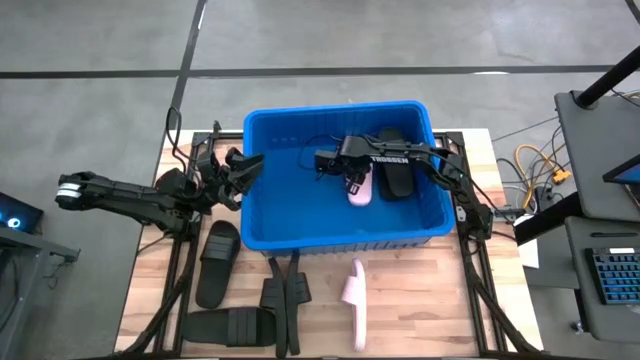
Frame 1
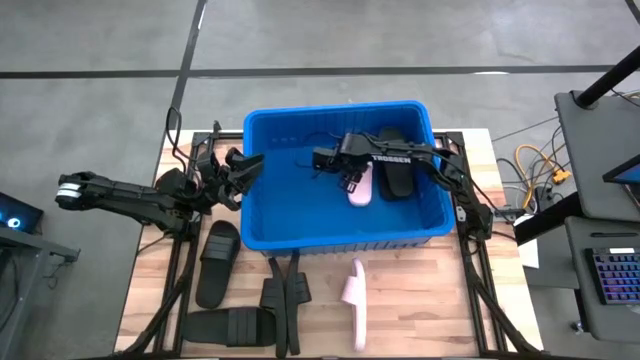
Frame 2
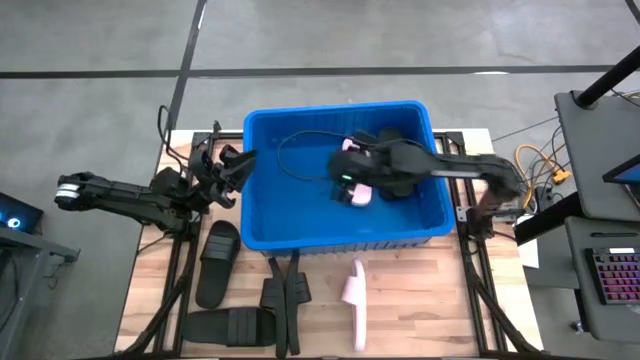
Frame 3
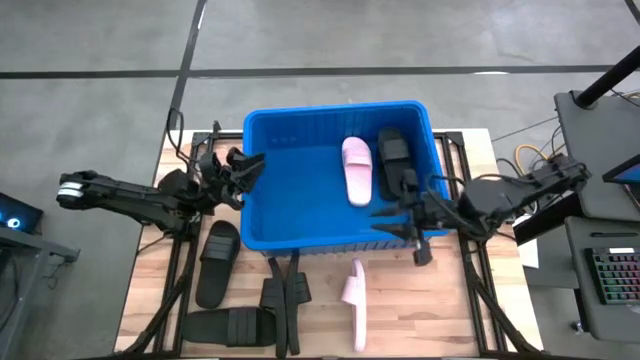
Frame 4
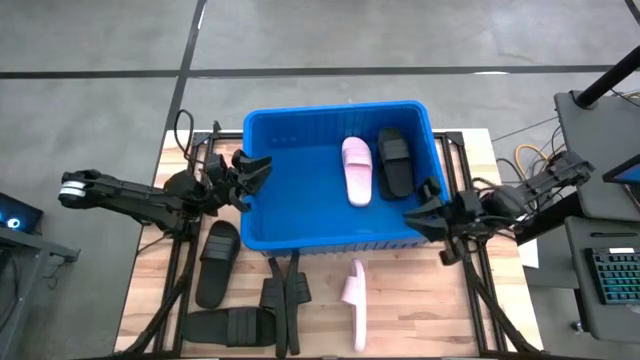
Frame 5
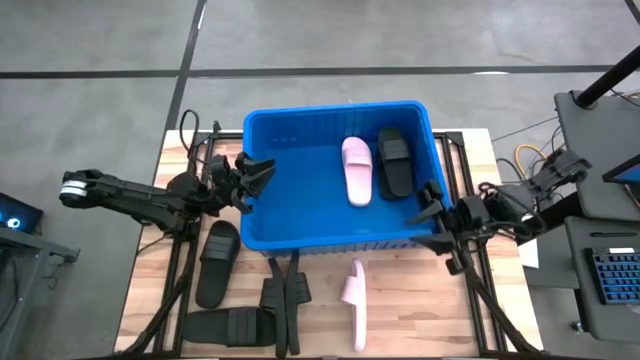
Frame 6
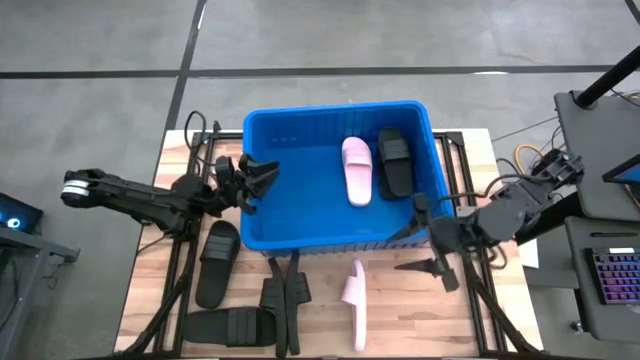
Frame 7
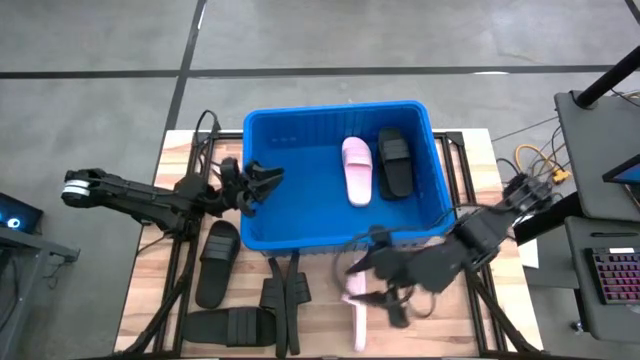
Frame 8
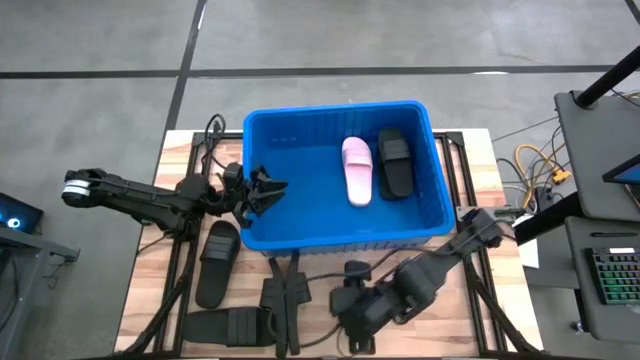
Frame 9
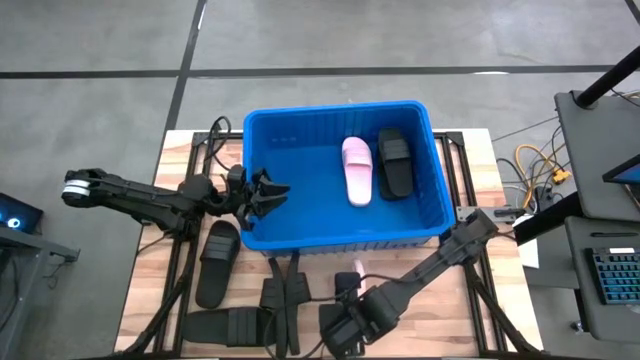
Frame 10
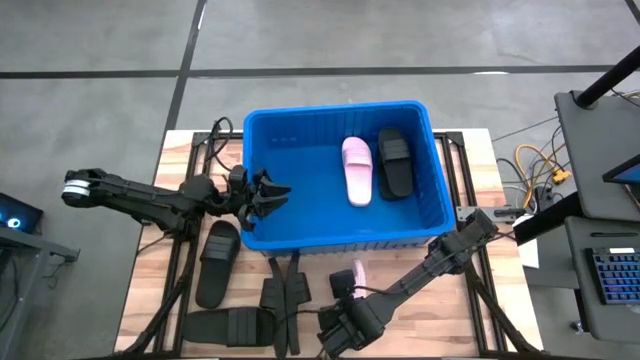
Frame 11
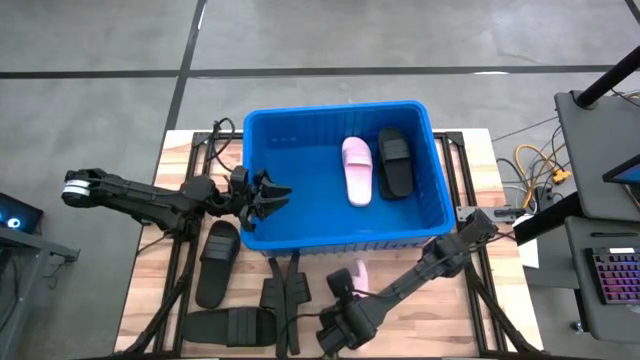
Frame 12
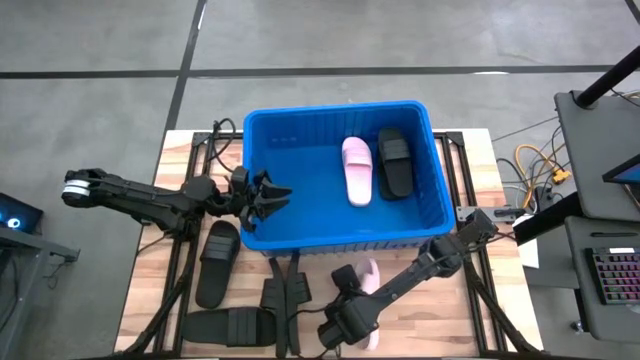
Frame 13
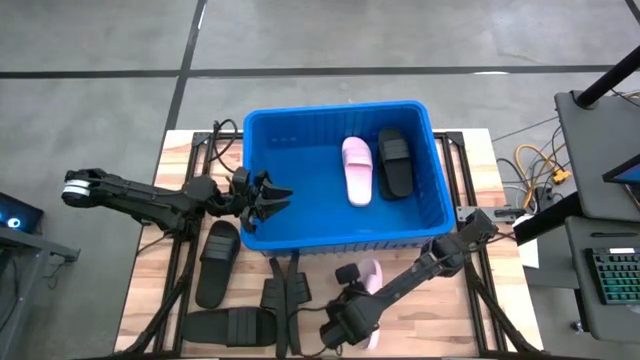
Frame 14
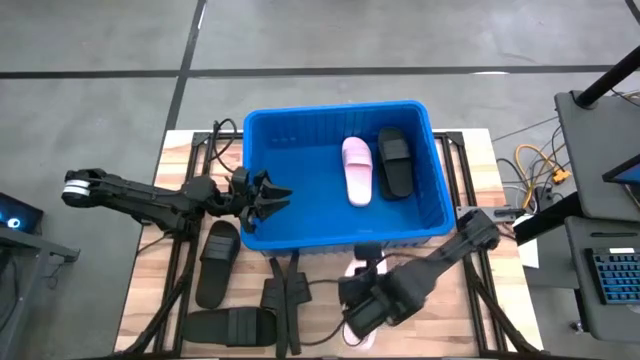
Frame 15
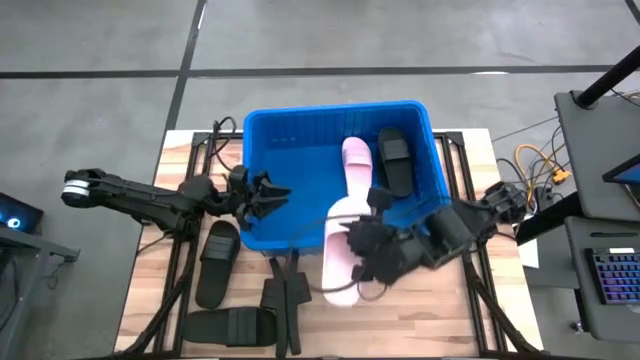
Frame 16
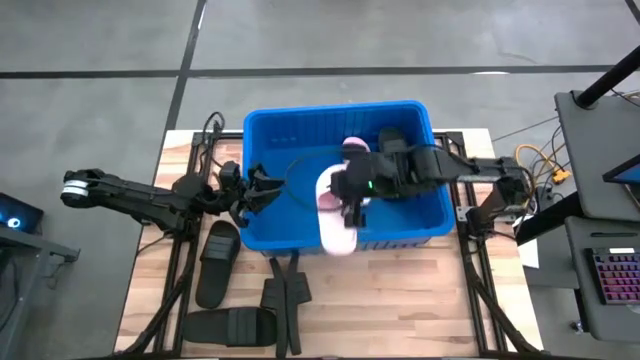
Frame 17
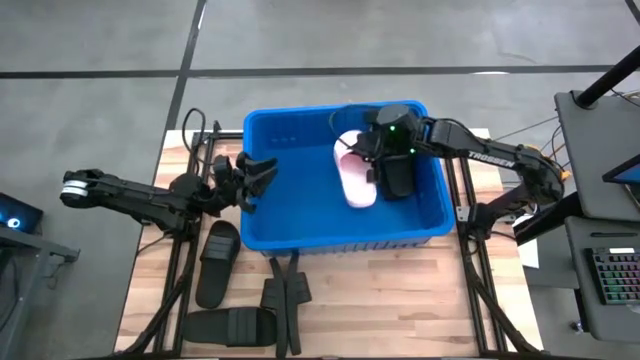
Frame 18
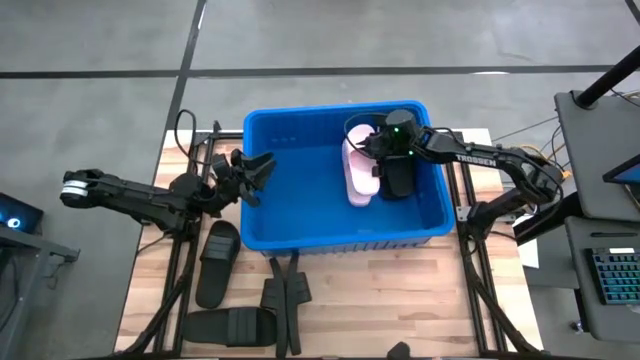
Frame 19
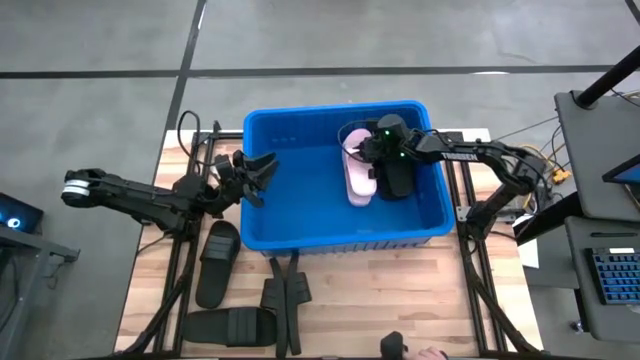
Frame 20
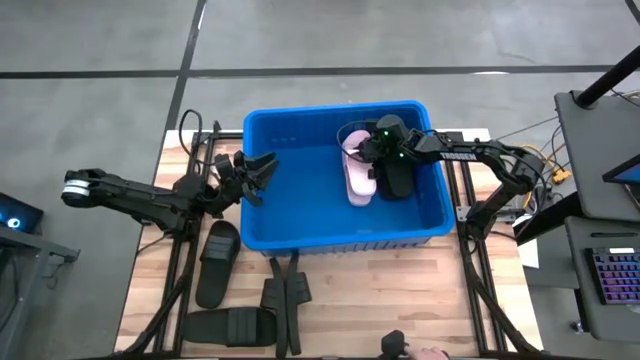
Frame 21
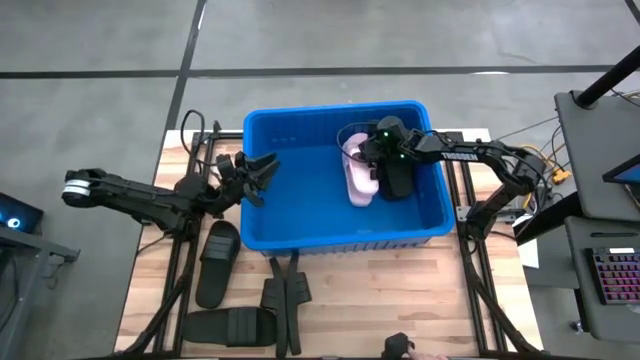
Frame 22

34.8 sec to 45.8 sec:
Task: Pick and place slides into bin
Put the pink slide into the blue bin

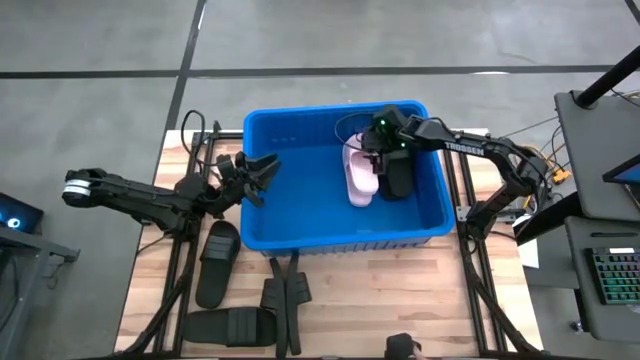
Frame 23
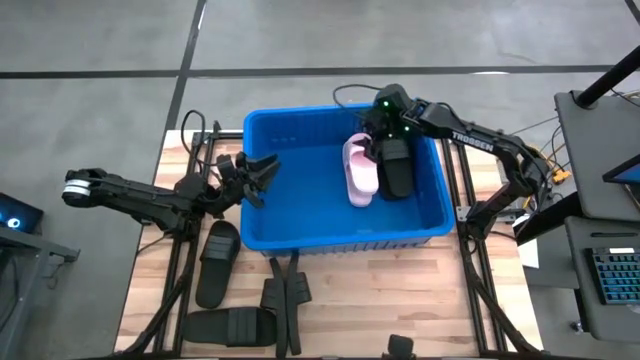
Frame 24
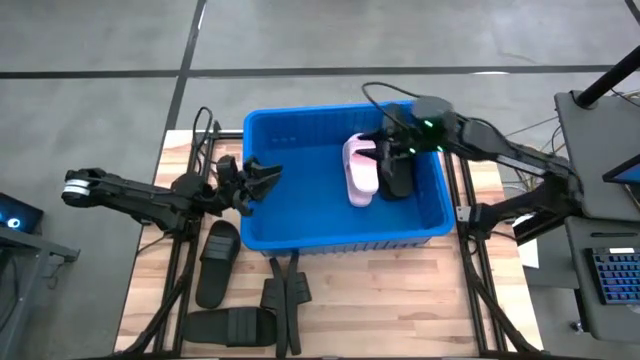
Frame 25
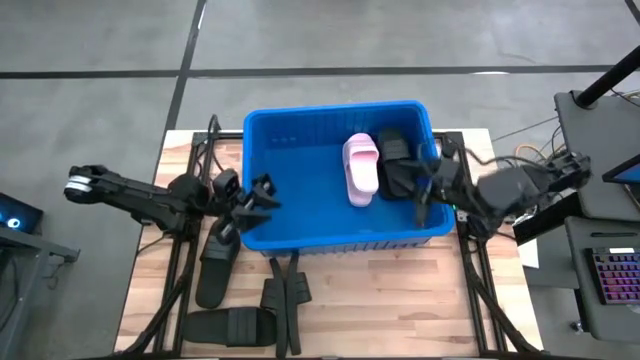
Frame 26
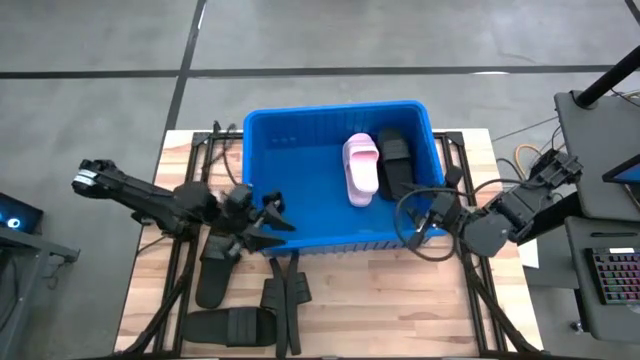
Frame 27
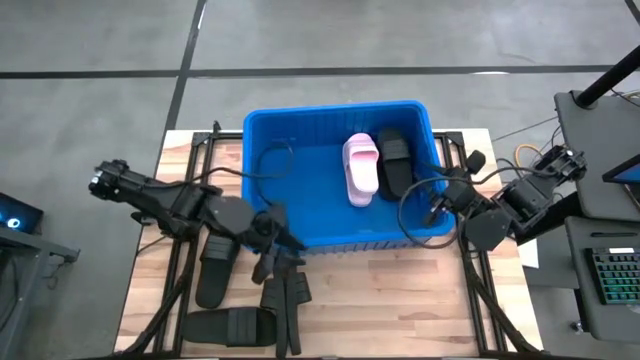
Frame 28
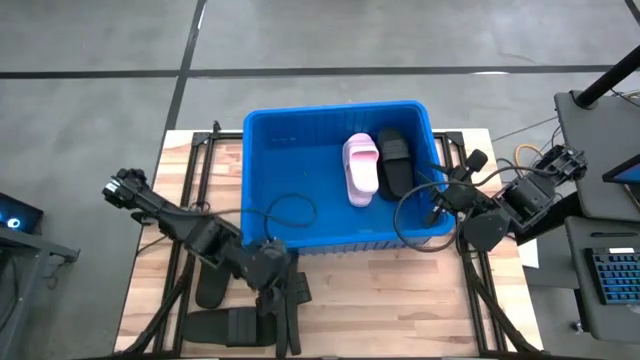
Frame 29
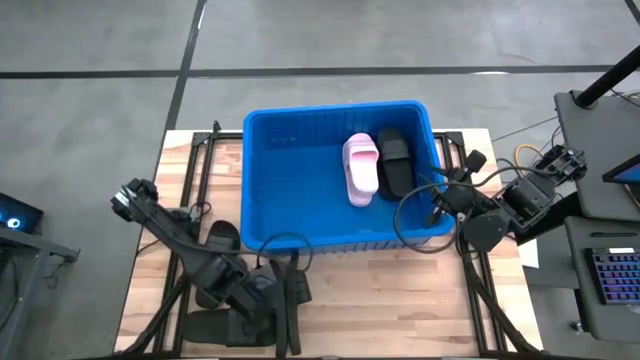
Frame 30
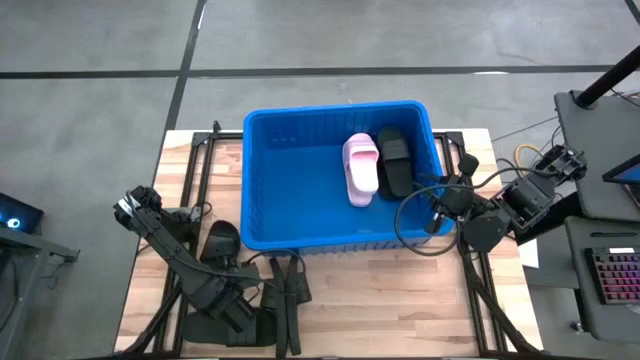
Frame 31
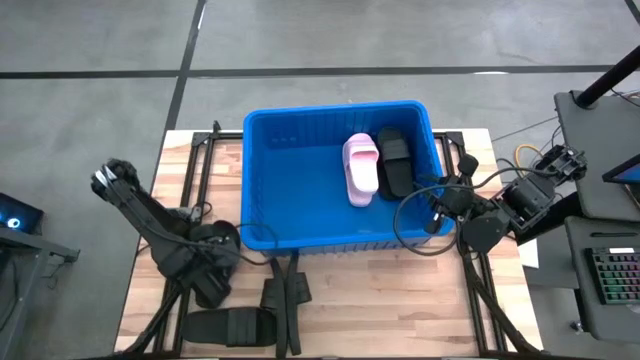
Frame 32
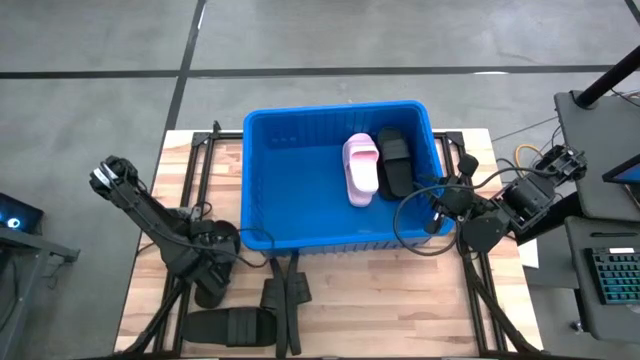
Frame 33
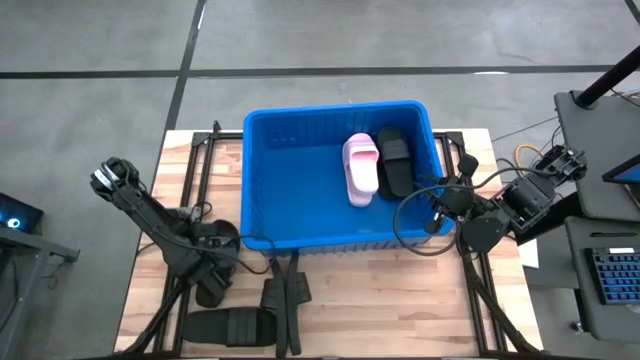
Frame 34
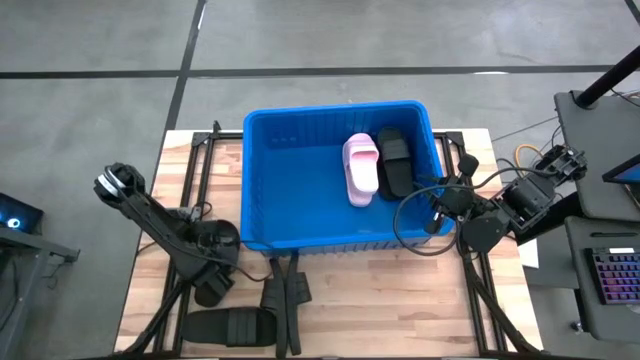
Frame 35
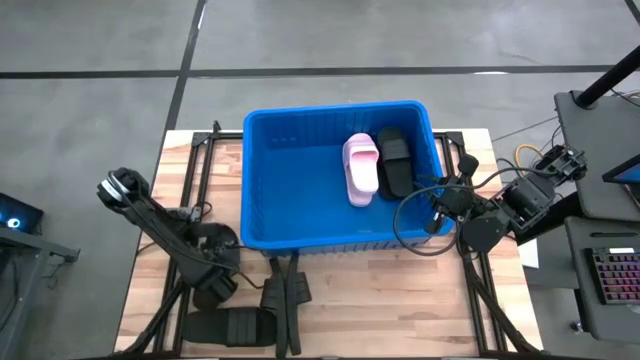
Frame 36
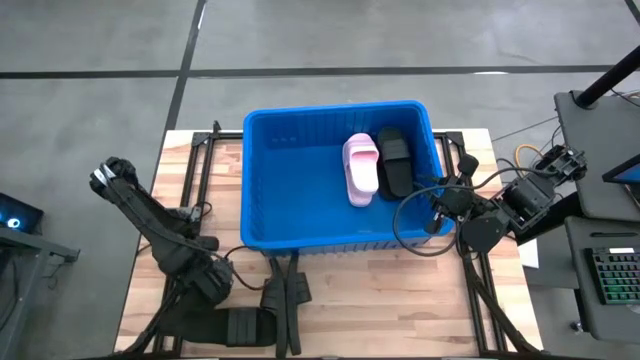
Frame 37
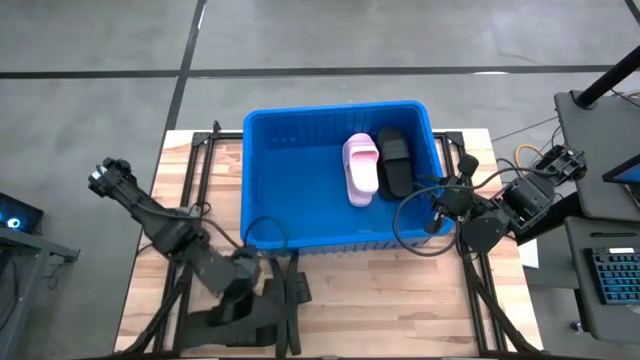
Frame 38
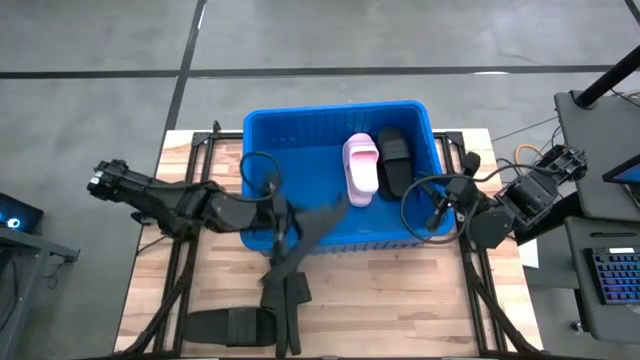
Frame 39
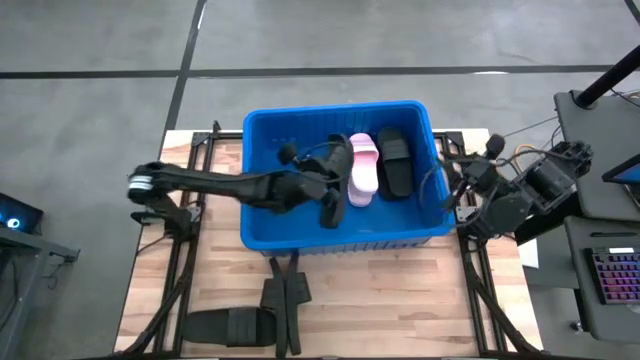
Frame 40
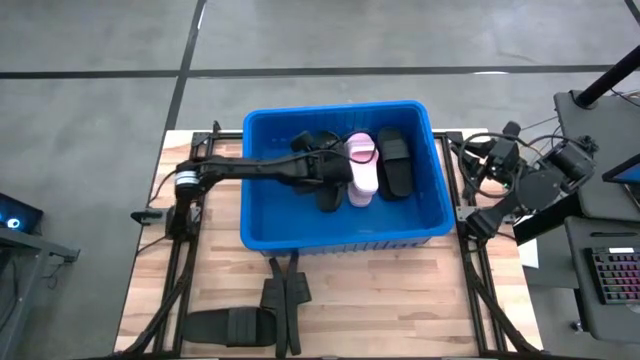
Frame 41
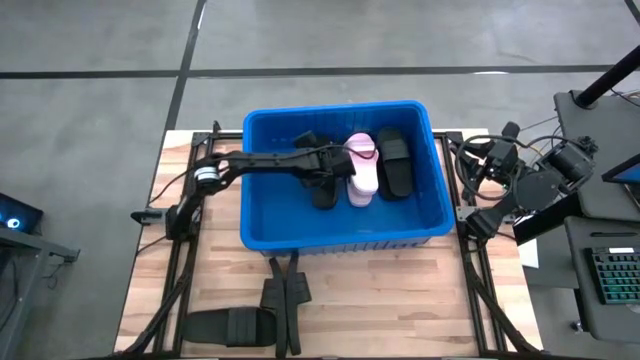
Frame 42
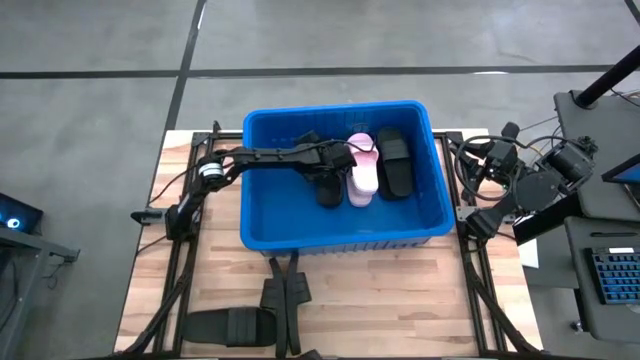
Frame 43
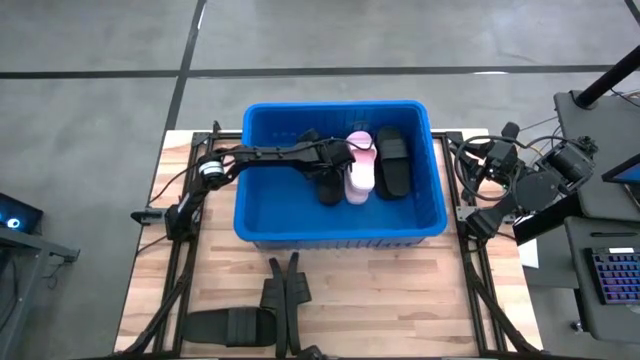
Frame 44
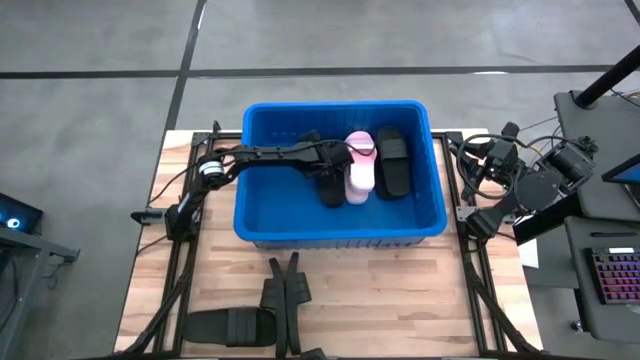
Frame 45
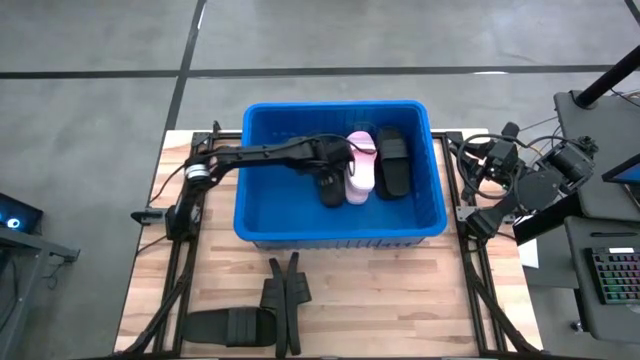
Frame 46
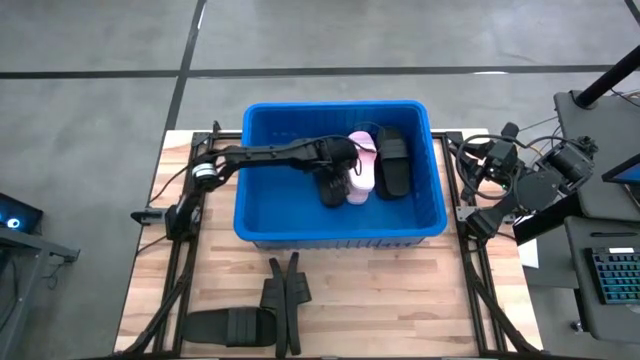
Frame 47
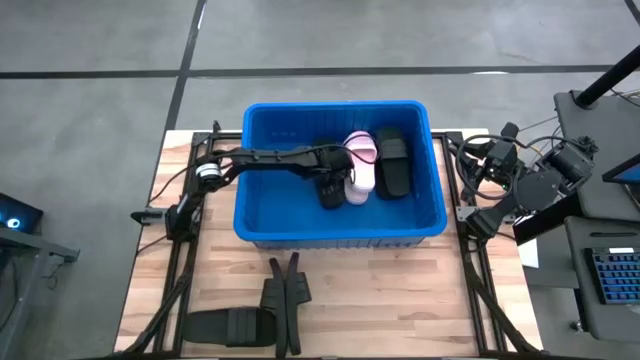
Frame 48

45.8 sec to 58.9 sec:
Put the black slide into the blue bin
